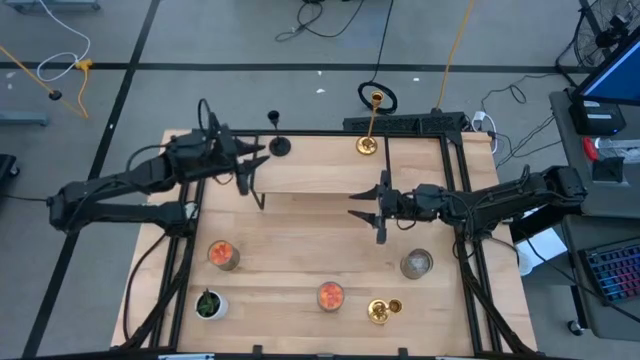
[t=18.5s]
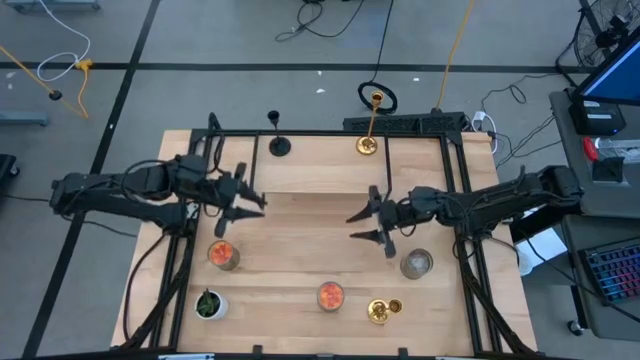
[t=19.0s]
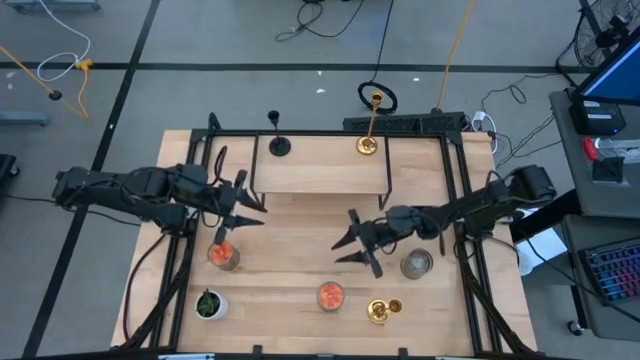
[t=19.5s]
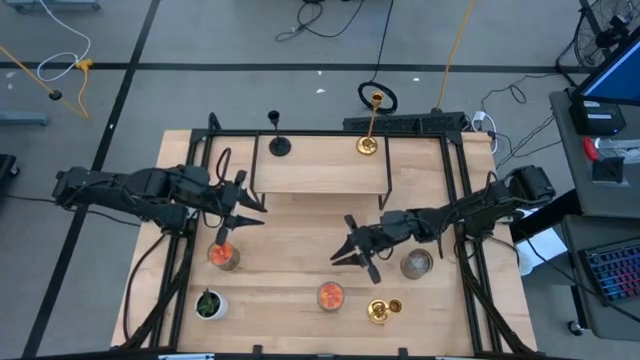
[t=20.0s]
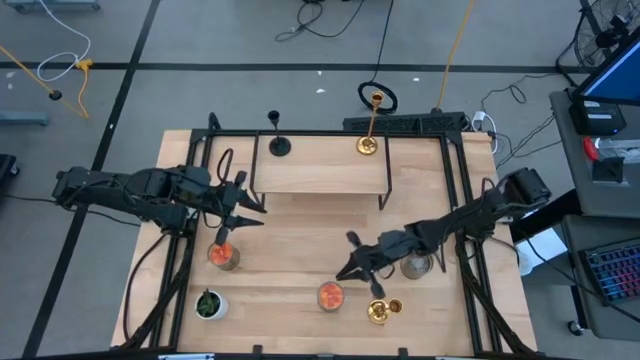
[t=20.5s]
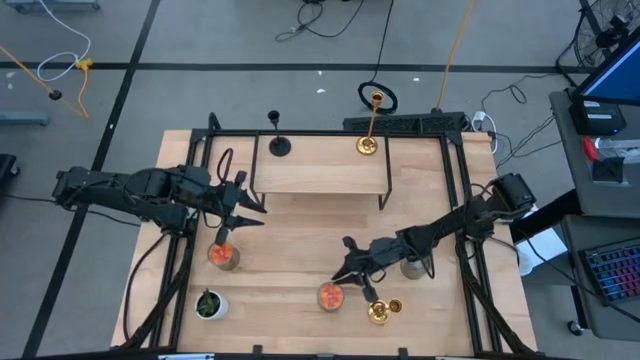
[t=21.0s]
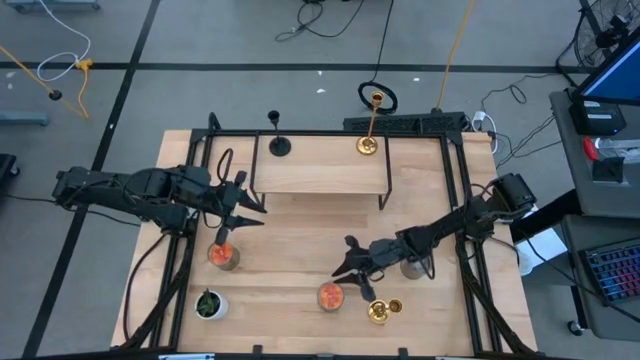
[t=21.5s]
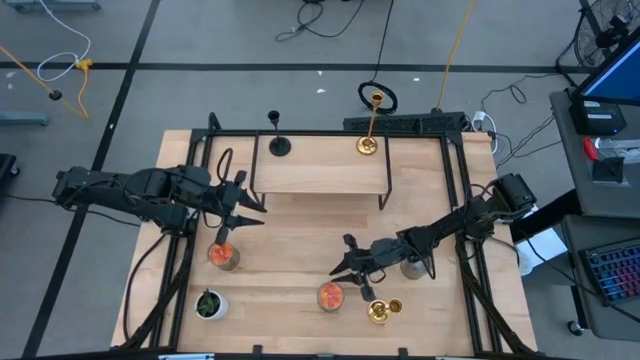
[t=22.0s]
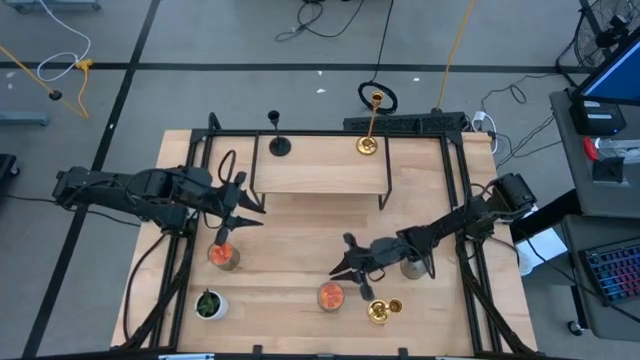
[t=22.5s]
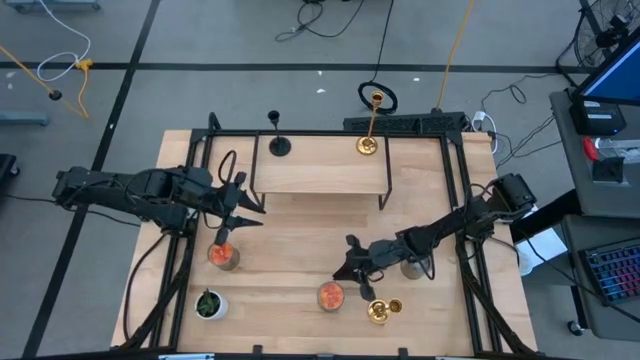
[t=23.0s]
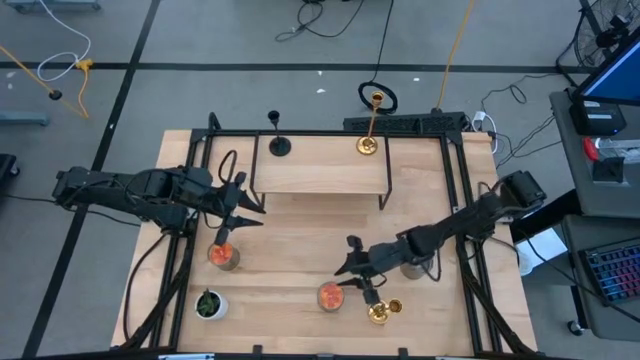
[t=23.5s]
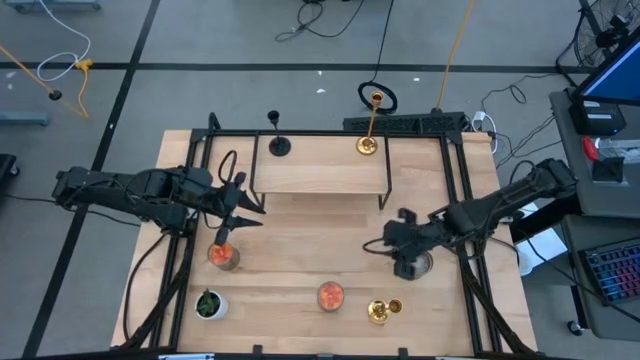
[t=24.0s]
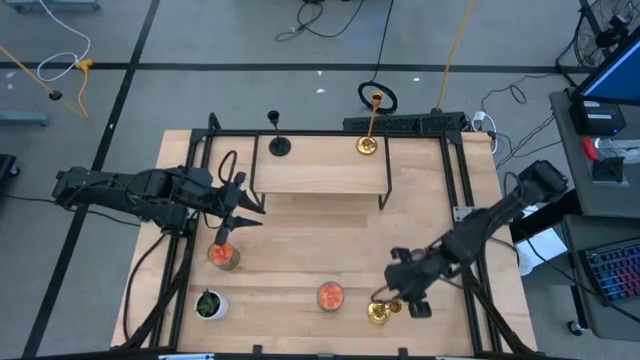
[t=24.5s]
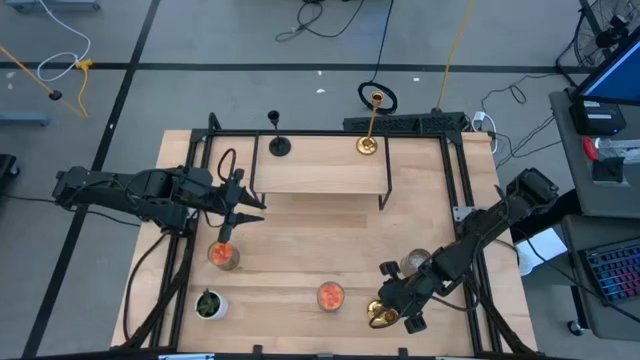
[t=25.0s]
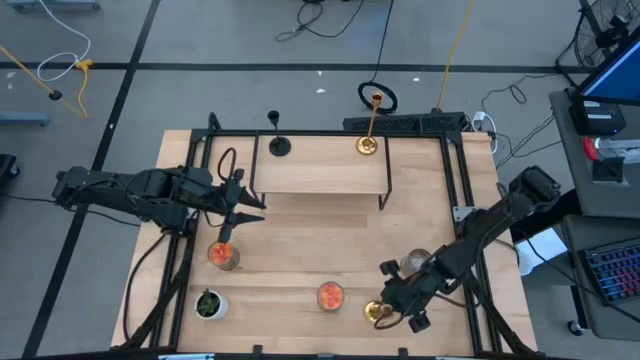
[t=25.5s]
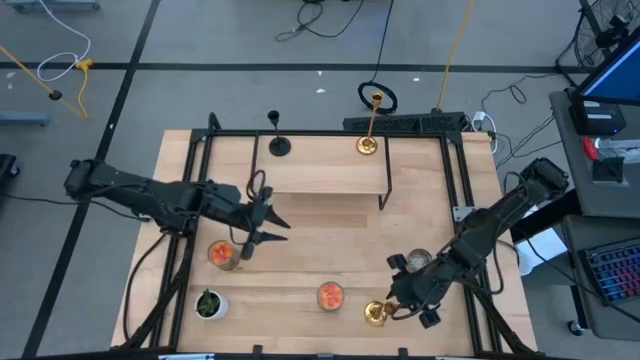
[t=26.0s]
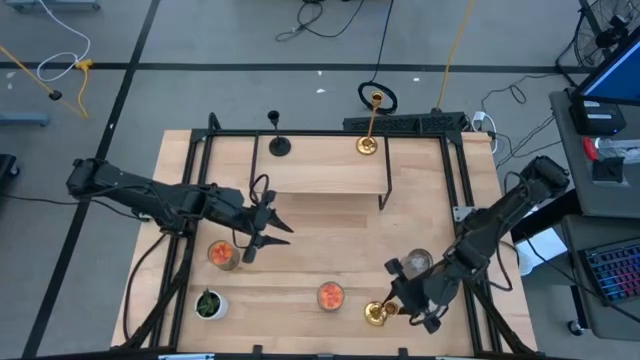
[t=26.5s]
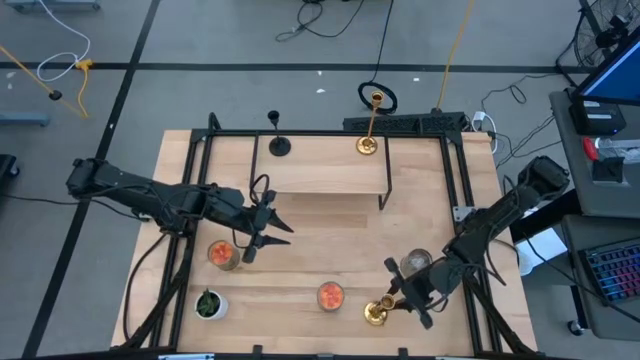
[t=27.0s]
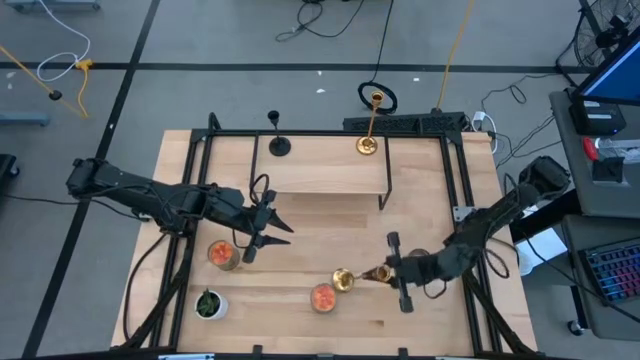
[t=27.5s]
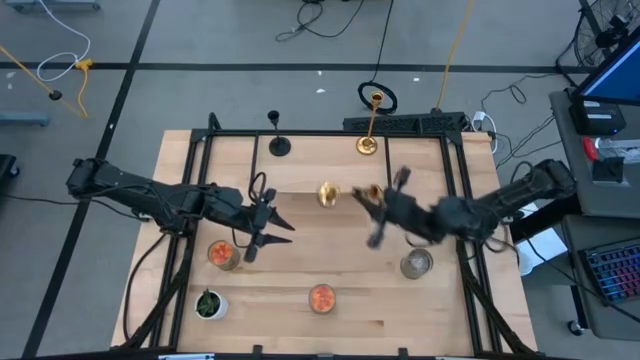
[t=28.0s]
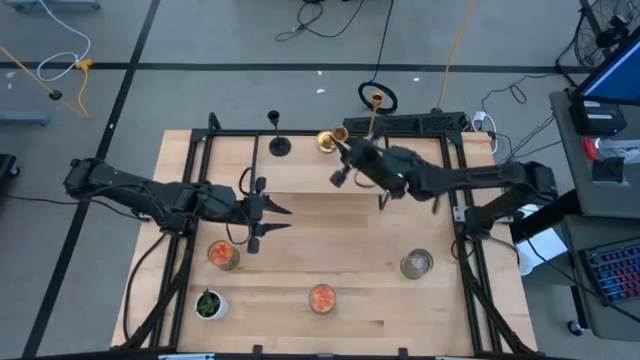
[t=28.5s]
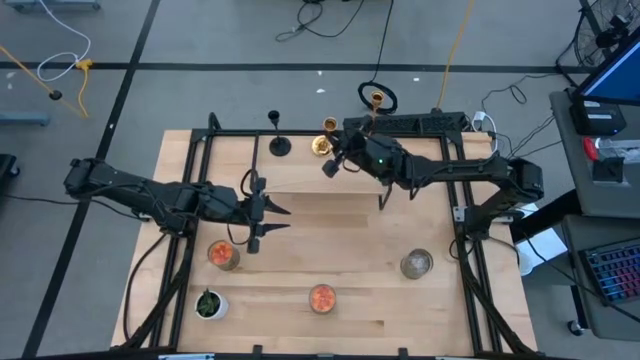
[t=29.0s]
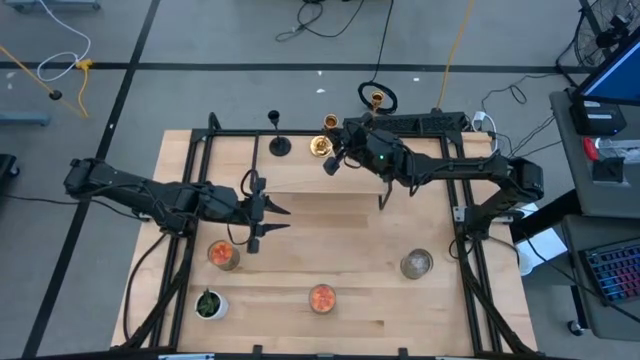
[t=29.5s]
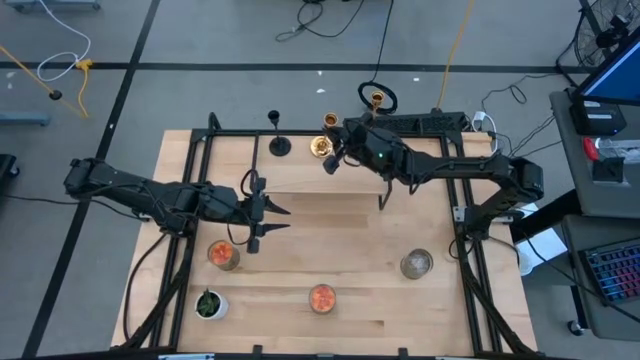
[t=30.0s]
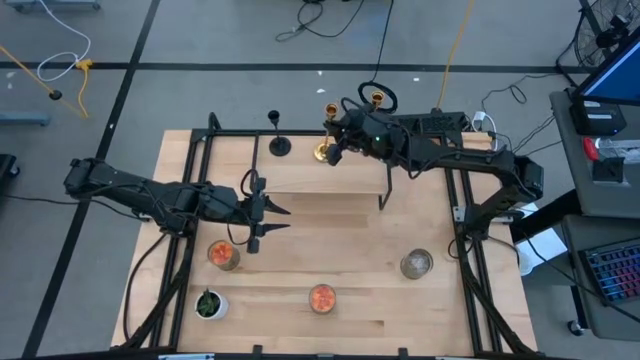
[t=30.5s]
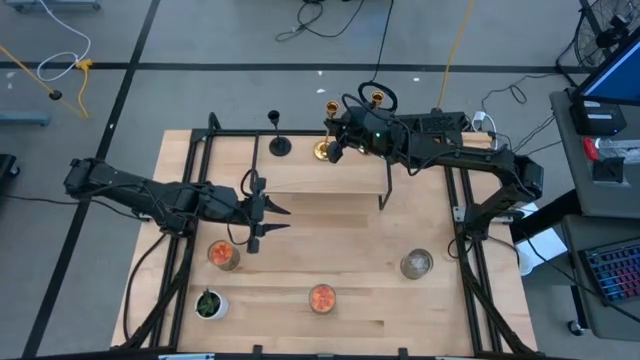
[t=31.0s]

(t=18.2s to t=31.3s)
Task: Pick & Place candle stick holders
Put the gold candle holder on the shelf

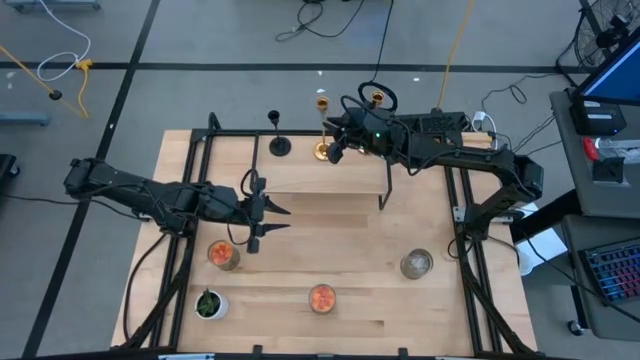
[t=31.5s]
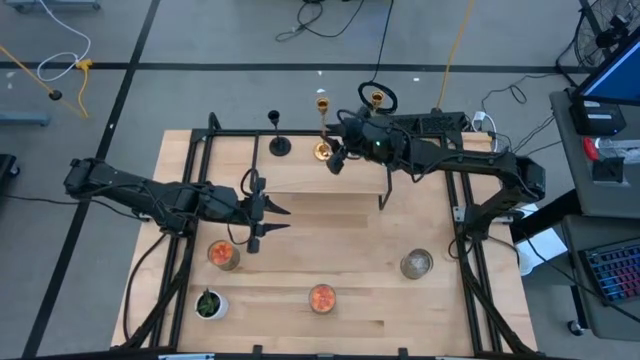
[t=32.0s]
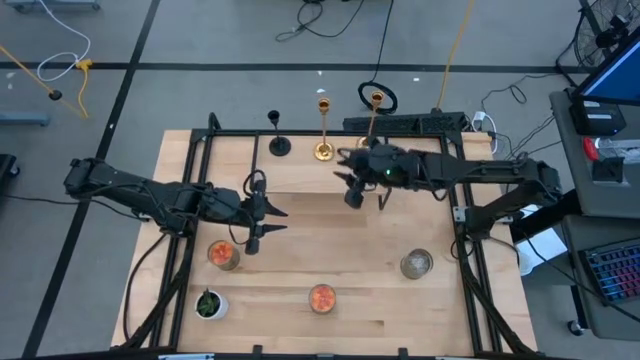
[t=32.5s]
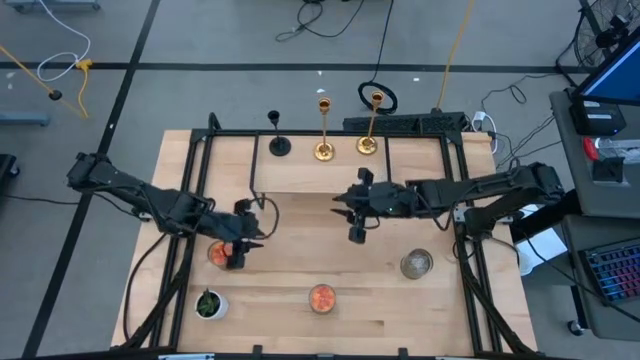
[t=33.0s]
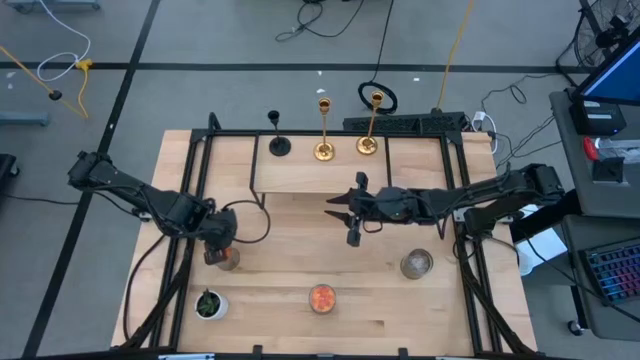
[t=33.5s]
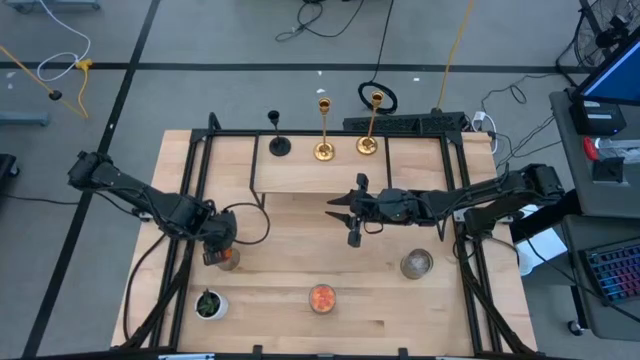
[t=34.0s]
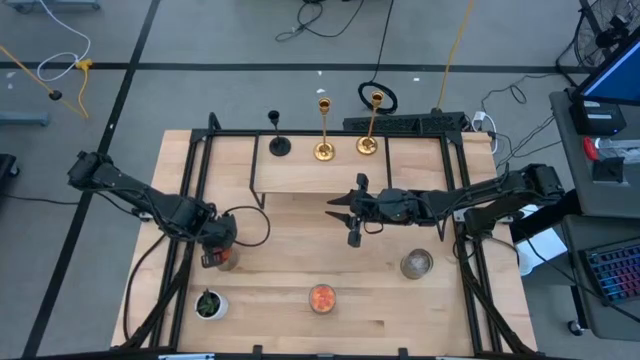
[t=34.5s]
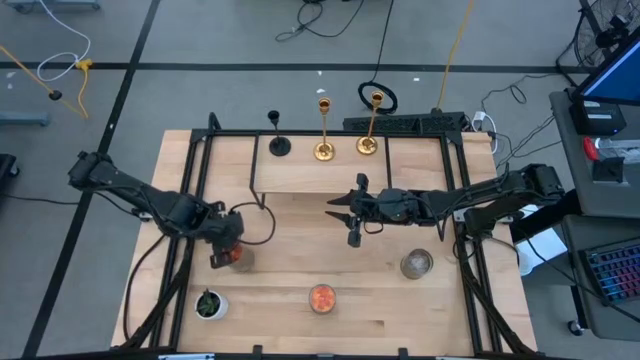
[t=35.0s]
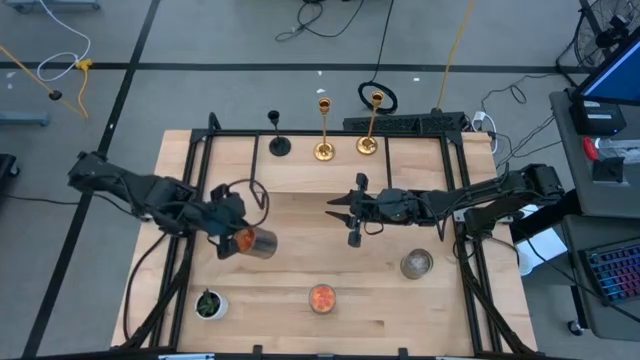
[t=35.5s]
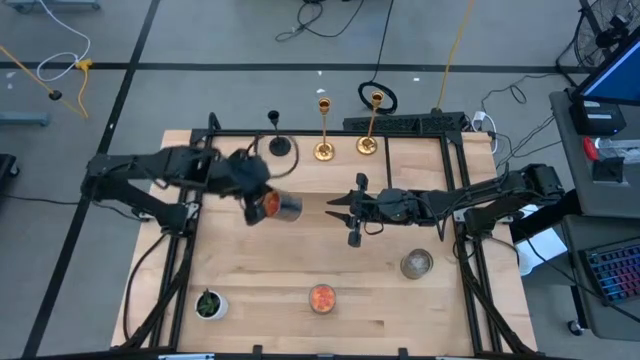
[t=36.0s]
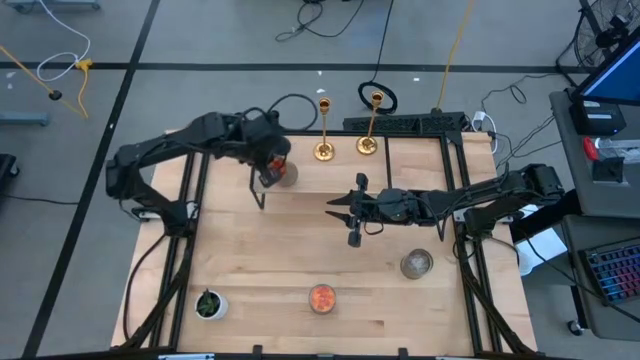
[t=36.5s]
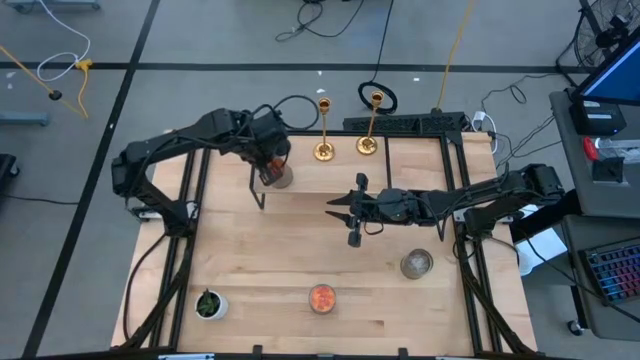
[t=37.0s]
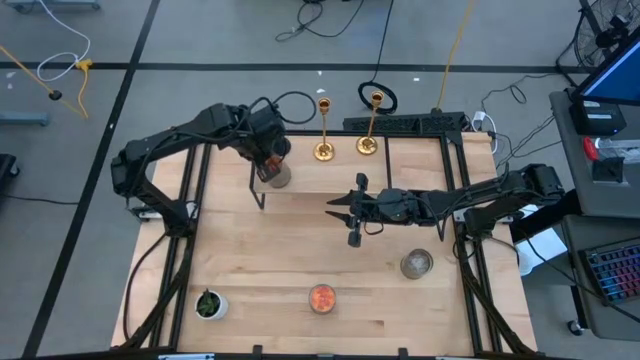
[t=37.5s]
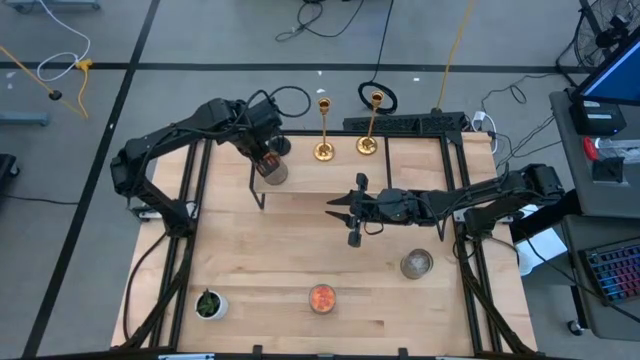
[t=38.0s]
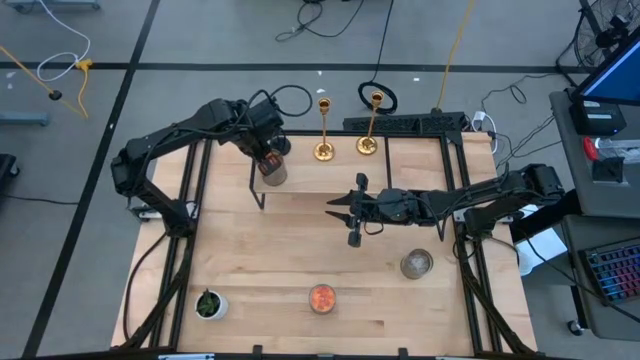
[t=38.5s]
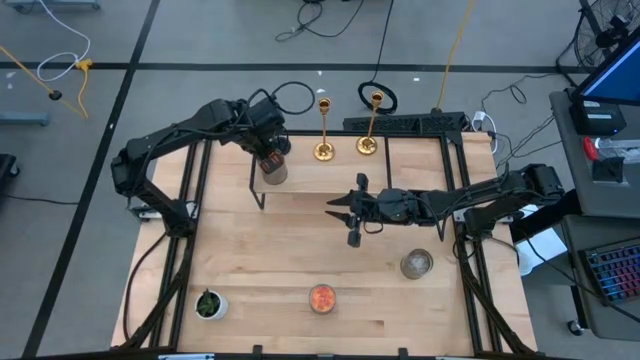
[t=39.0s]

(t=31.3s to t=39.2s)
Put the left orange scented candle on the shelf aligned with the black candle holder
